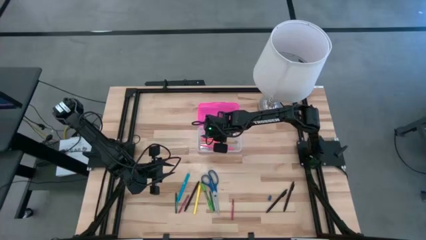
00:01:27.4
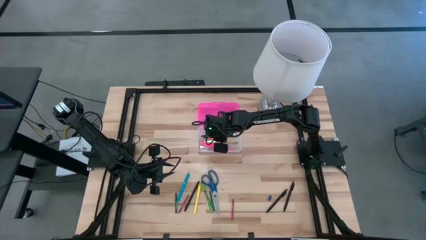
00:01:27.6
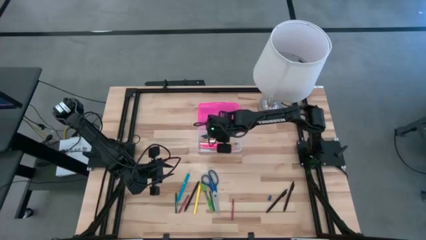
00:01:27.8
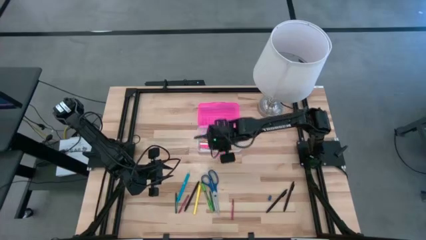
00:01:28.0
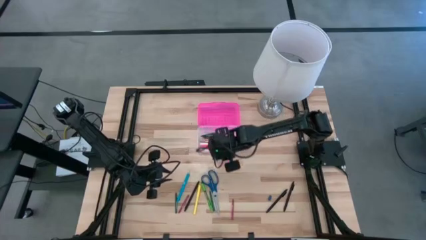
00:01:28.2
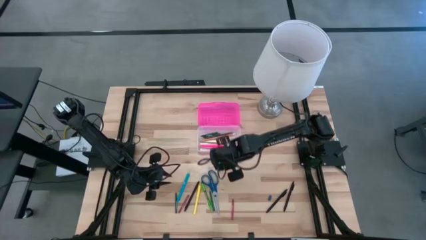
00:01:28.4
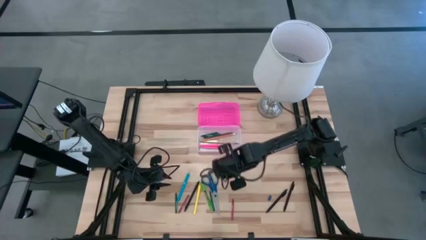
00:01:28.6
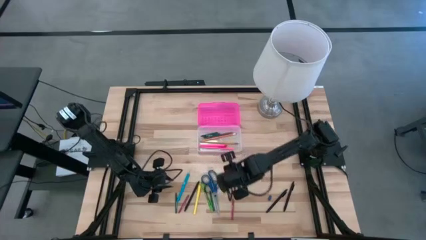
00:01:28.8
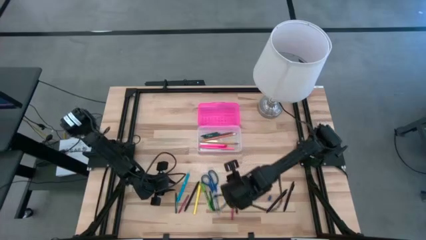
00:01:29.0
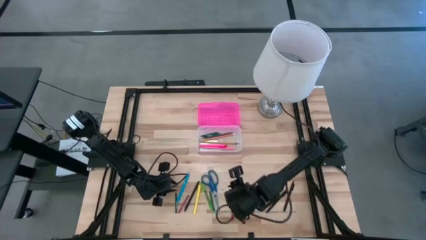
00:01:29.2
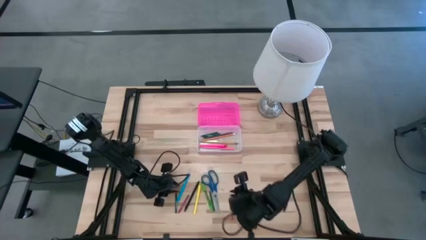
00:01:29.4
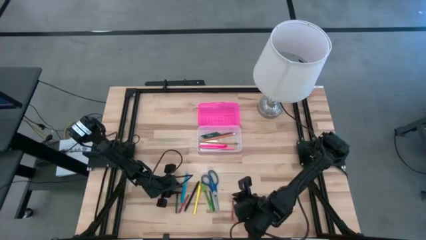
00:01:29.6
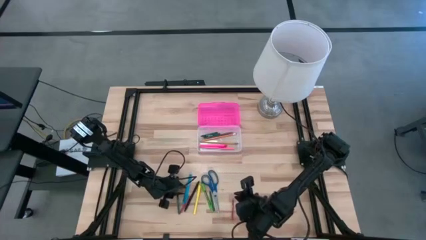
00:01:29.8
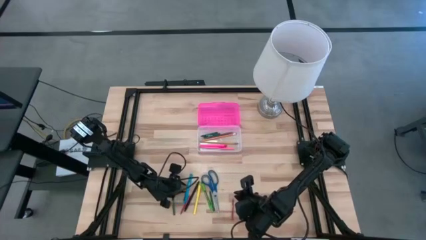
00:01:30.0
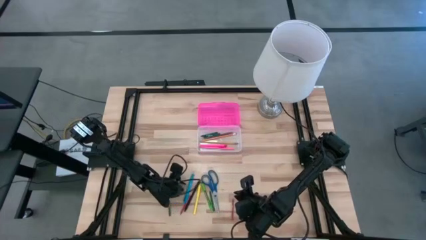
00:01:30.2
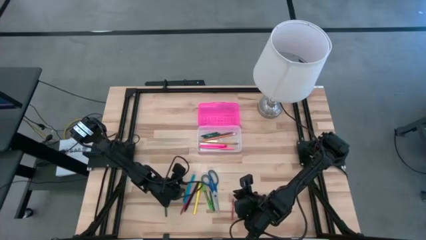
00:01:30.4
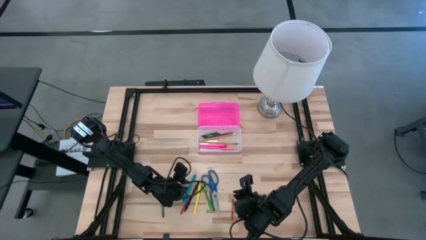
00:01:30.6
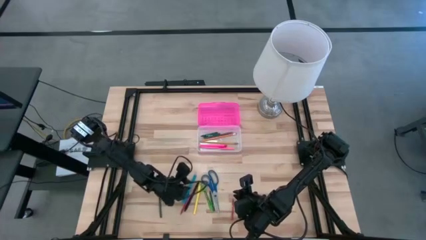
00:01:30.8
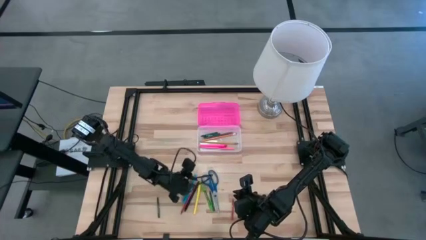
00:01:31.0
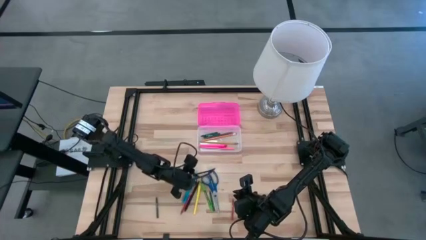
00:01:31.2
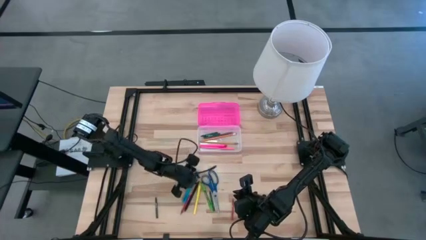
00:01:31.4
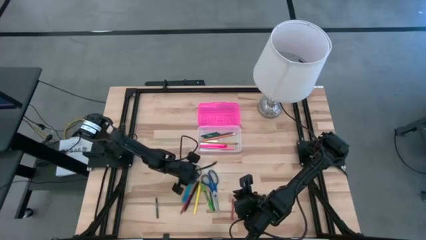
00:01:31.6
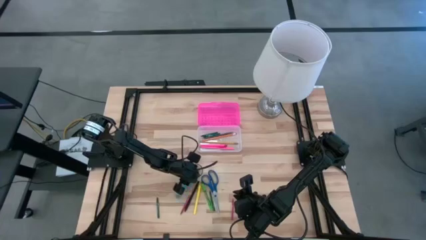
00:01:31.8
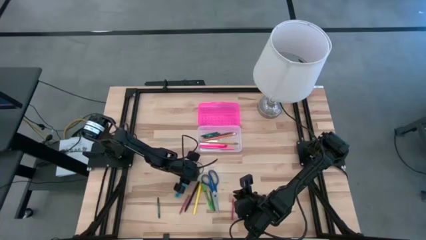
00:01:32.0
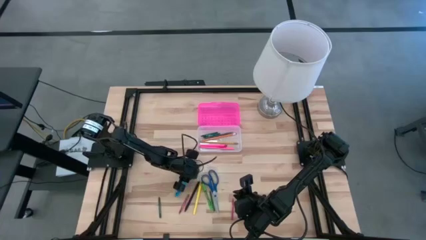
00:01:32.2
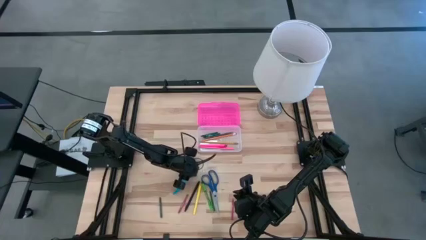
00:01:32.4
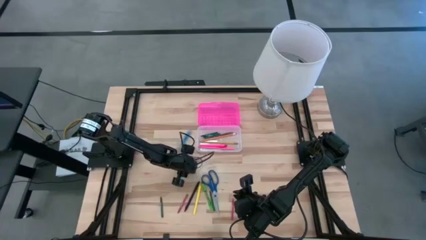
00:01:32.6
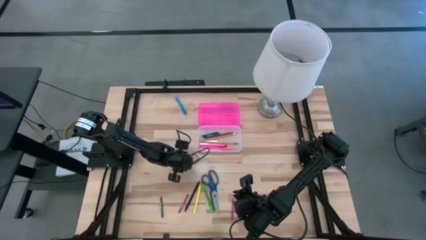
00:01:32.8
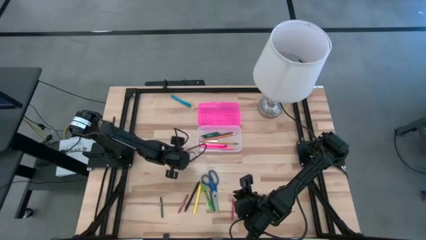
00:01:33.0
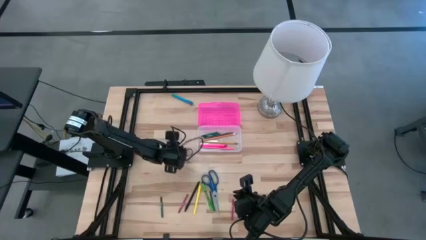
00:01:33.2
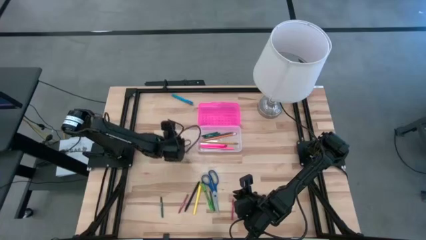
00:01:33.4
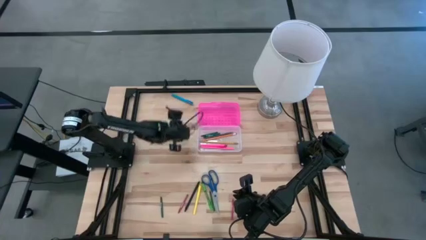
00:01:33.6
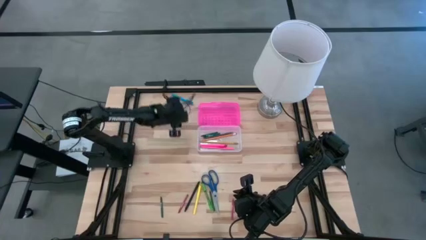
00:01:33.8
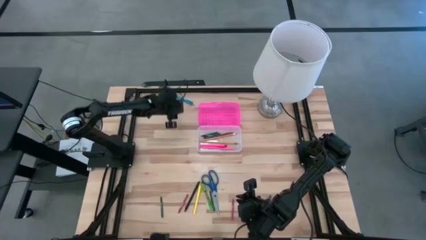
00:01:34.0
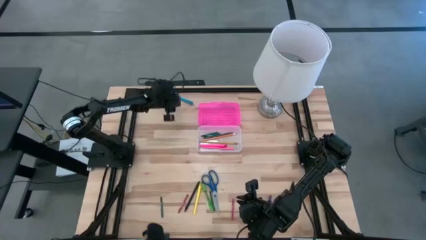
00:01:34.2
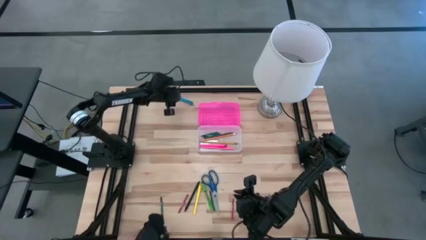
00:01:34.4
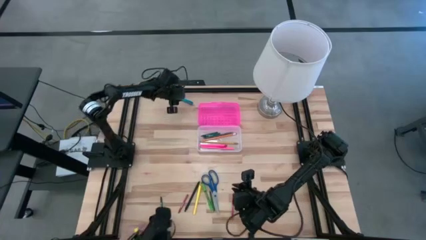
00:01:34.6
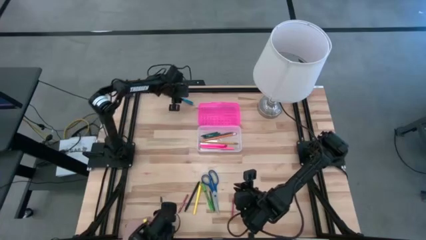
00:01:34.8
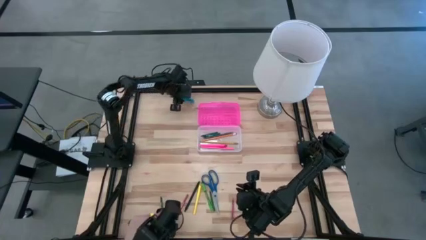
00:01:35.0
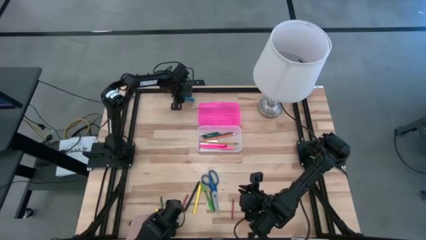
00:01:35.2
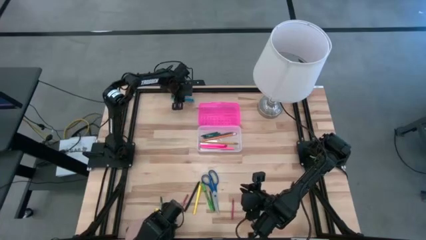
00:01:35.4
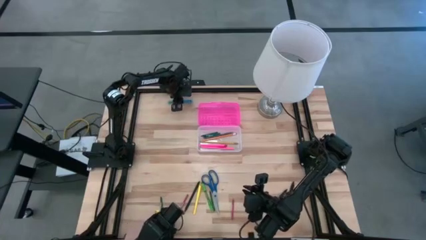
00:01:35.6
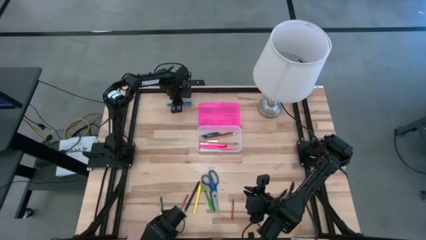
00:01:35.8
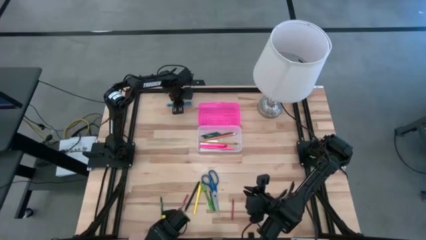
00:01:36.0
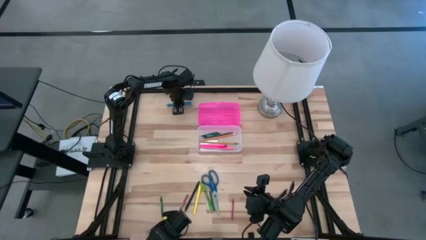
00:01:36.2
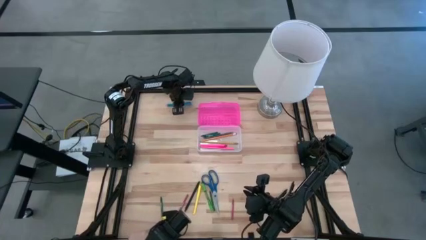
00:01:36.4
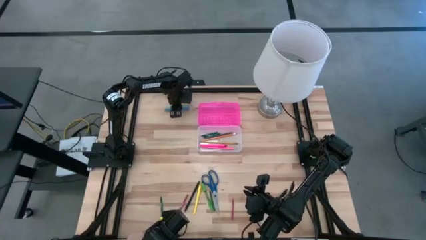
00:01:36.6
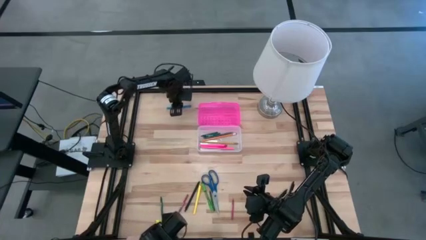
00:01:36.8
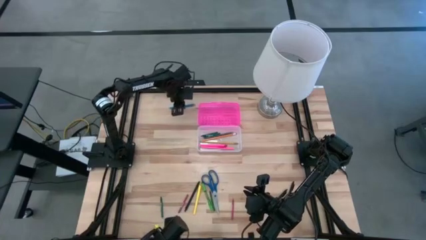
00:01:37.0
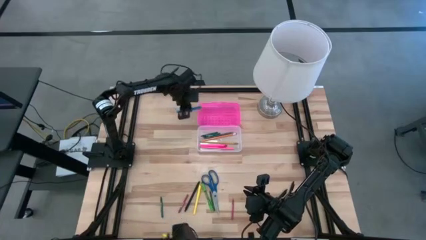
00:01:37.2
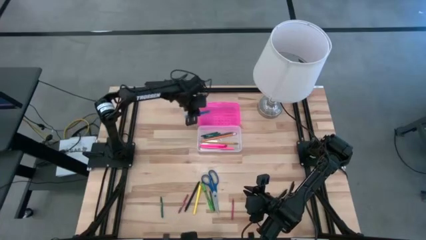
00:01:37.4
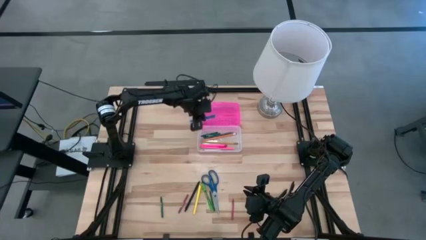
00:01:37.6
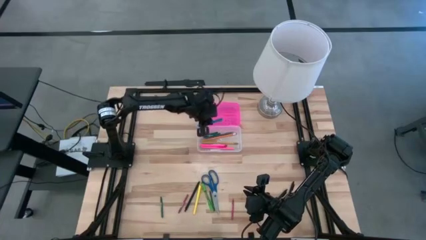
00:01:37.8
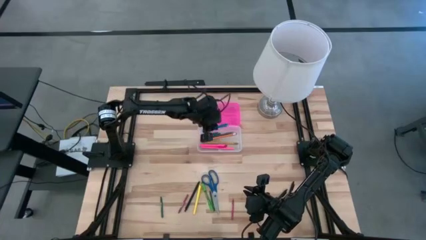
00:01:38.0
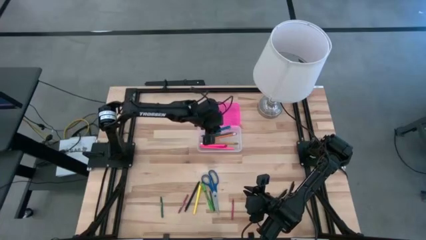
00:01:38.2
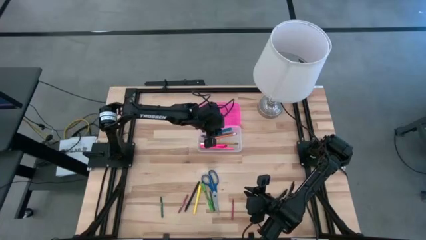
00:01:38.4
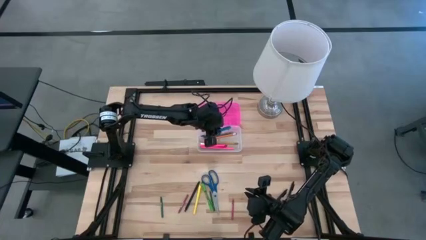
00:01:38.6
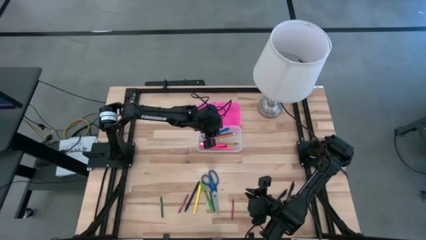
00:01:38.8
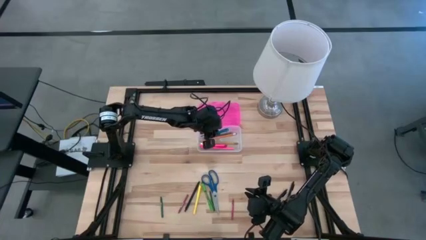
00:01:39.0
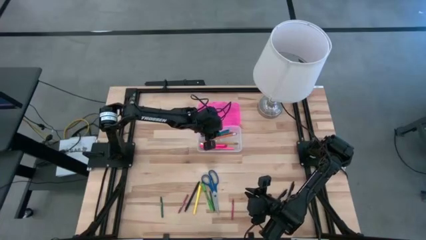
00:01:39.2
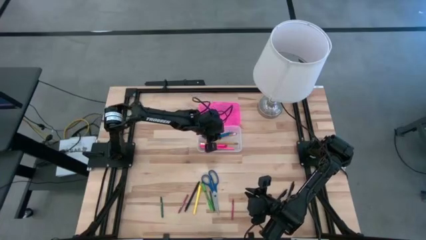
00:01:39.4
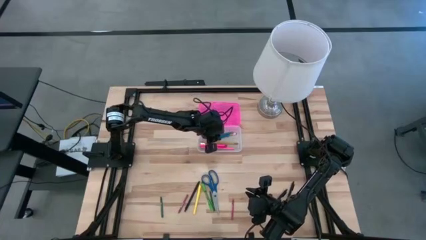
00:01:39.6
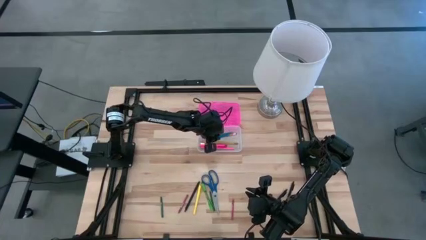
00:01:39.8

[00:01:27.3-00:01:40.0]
Task: Pick & place school supplies into a supply box
Put the blue multi-color pen into the supply box

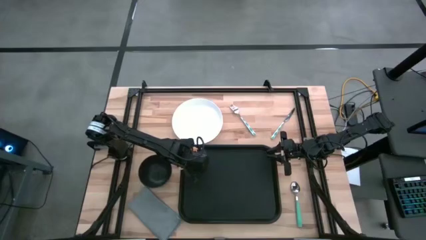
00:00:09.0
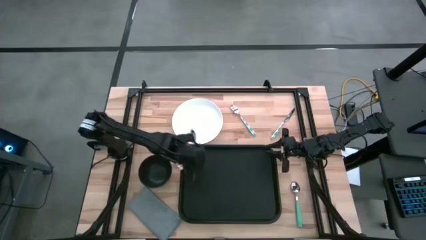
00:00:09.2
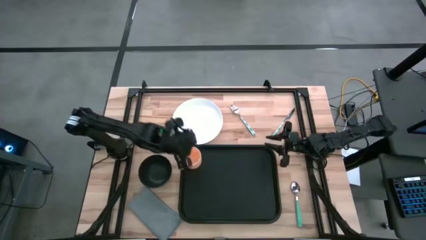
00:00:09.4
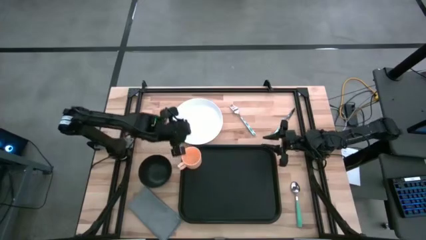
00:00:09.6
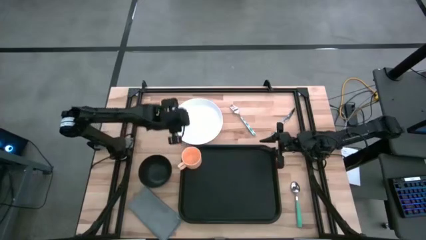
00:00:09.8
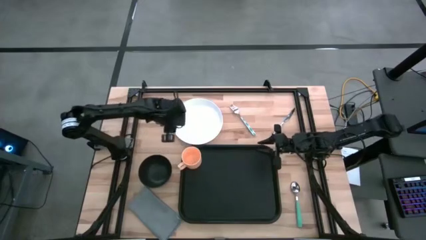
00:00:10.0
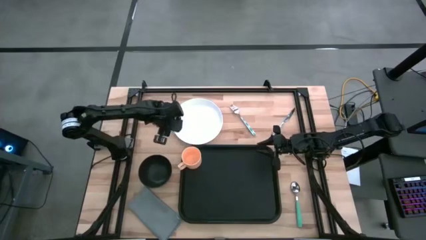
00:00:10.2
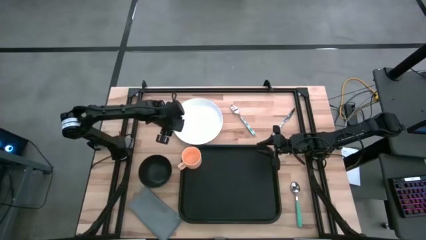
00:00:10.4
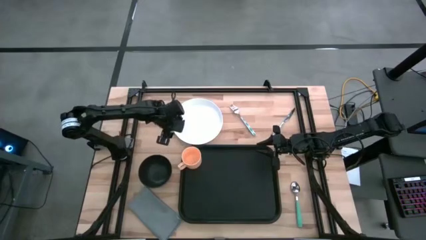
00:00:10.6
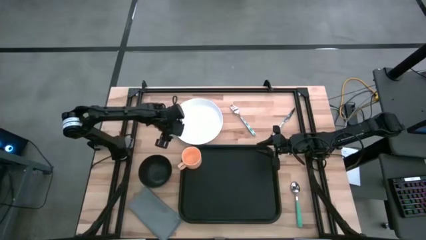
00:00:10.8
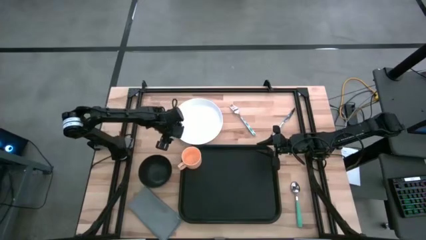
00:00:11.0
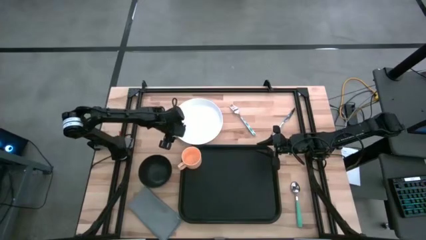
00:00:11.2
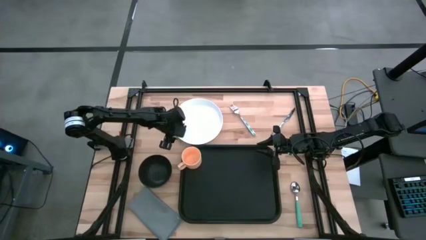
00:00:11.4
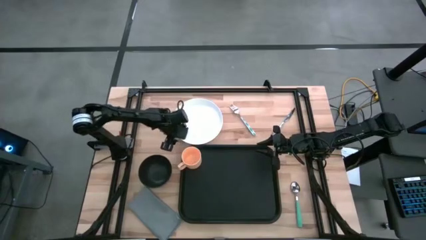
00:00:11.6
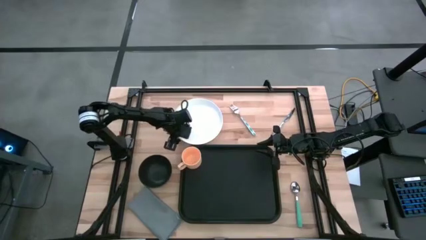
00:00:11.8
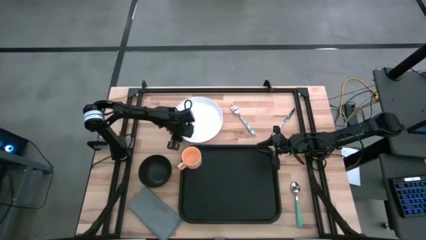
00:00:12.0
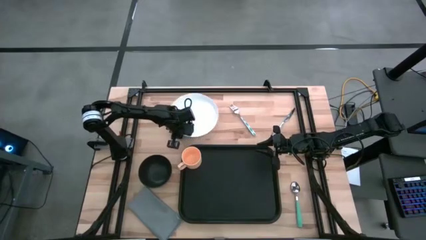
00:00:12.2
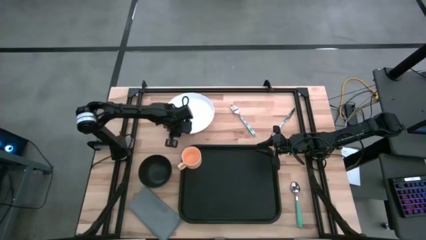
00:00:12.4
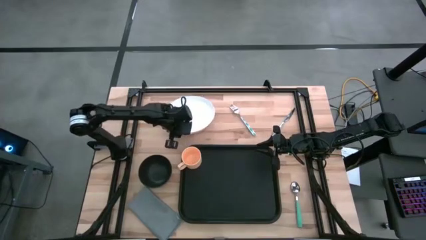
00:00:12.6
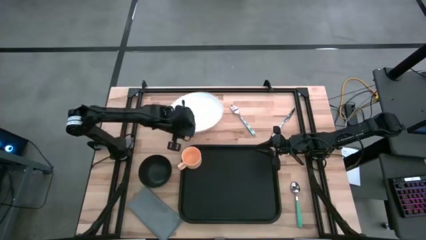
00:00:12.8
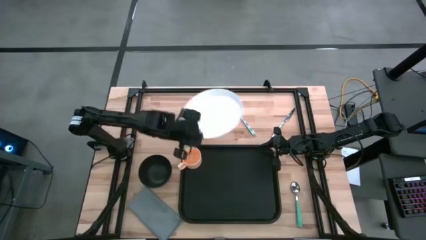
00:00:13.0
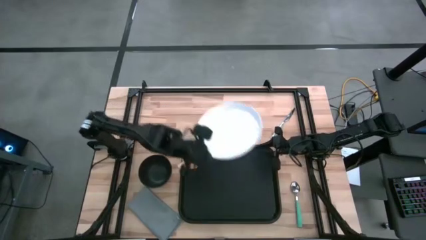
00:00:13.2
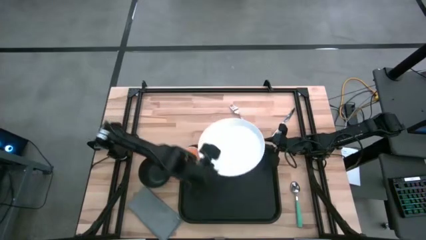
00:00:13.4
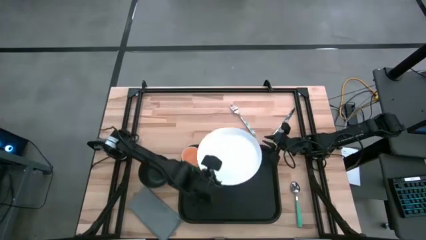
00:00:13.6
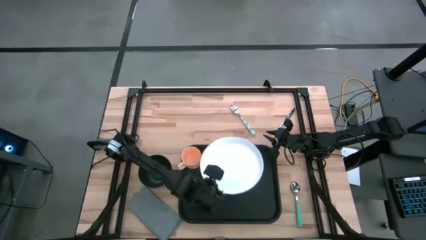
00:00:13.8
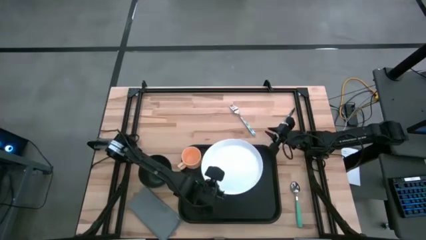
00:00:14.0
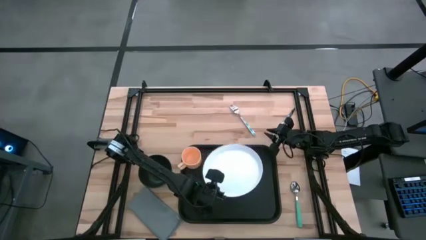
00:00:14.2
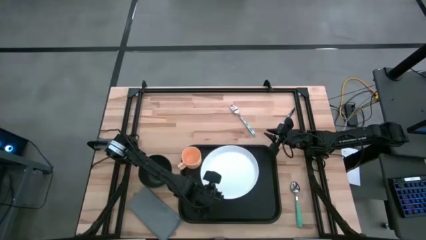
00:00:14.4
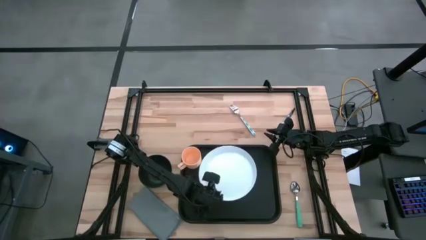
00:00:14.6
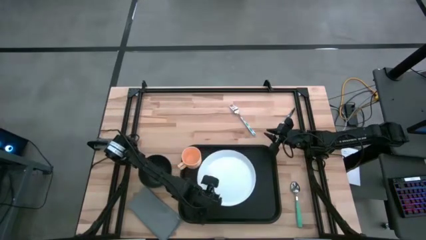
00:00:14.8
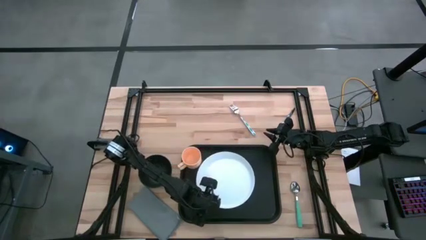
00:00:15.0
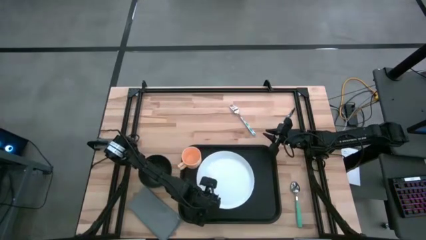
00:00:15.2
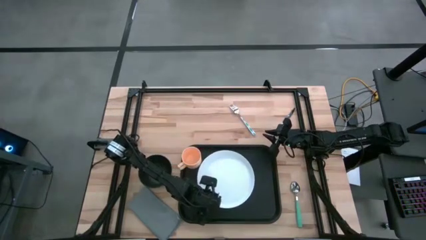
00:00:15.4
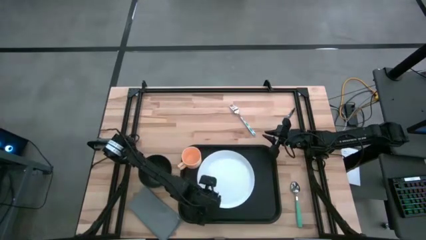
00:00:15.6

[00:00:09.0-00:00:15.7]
Task: Set up tray
Put the white plate to the right of the yellow mug on the black tray
